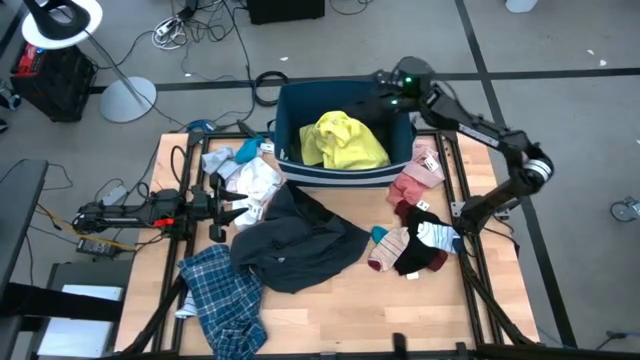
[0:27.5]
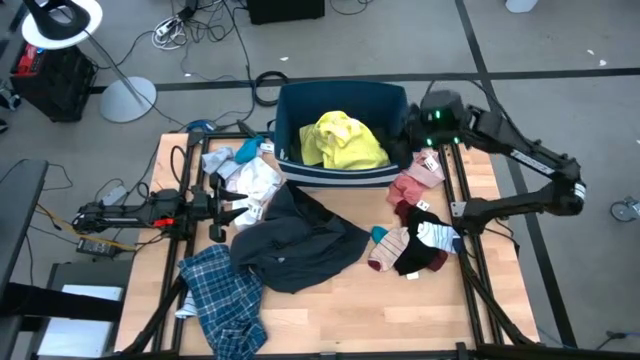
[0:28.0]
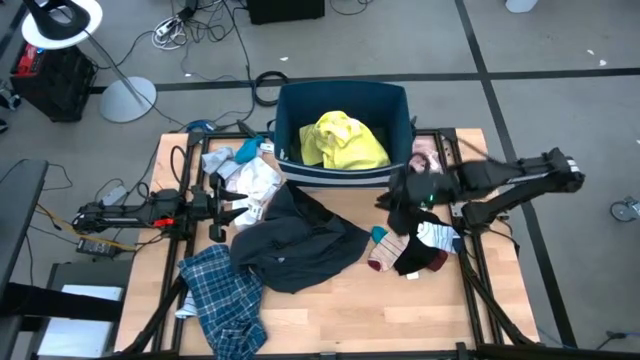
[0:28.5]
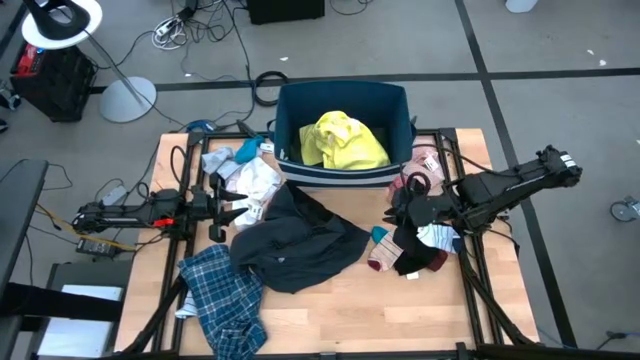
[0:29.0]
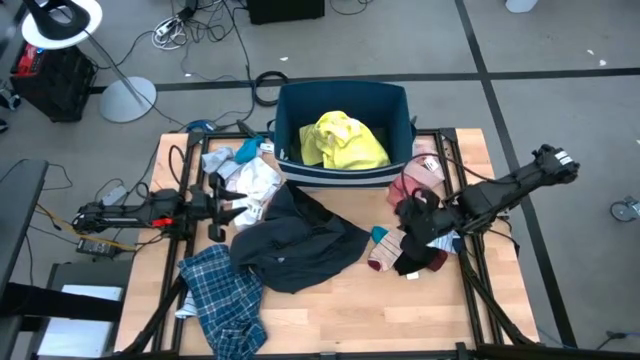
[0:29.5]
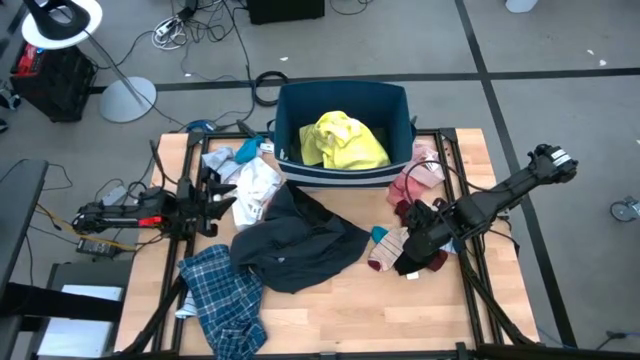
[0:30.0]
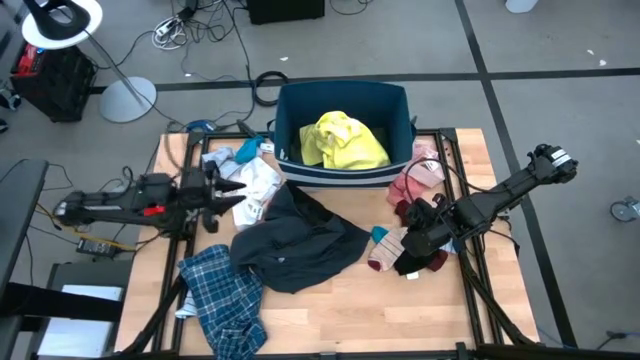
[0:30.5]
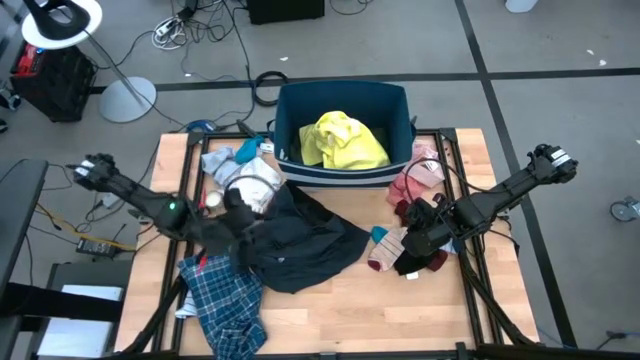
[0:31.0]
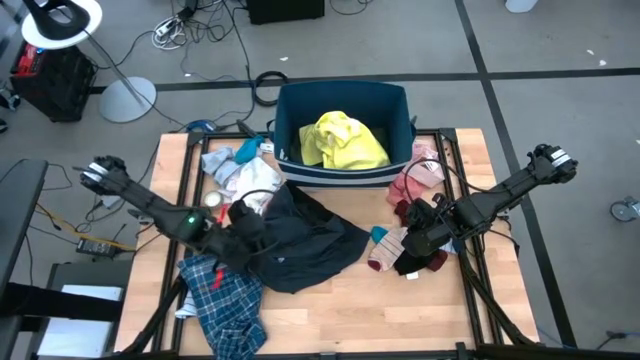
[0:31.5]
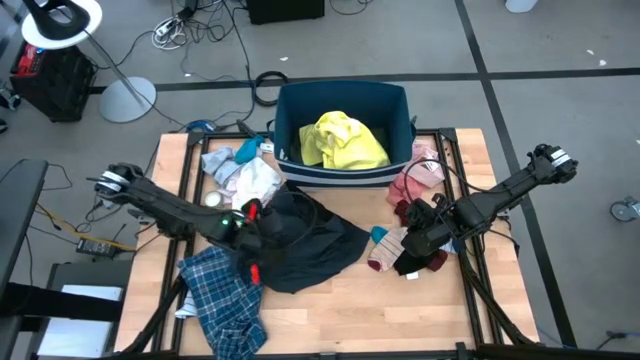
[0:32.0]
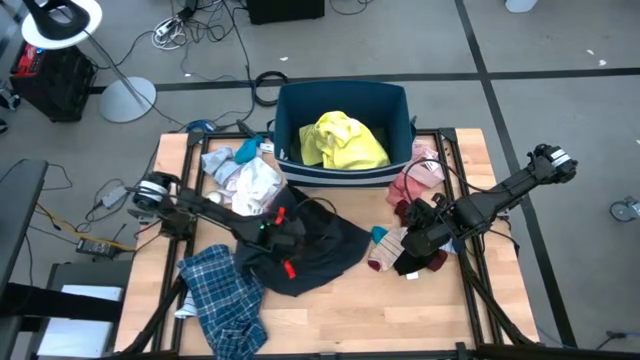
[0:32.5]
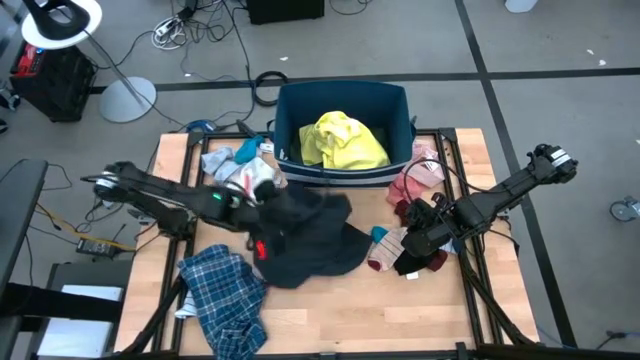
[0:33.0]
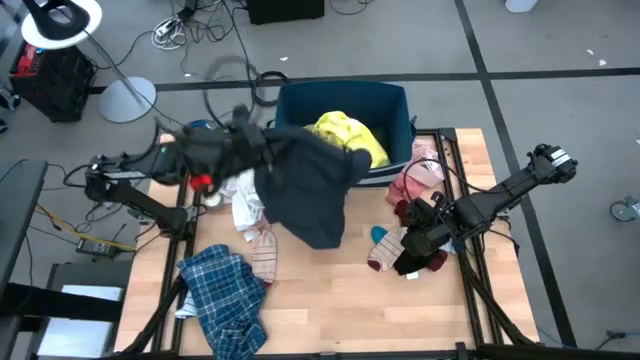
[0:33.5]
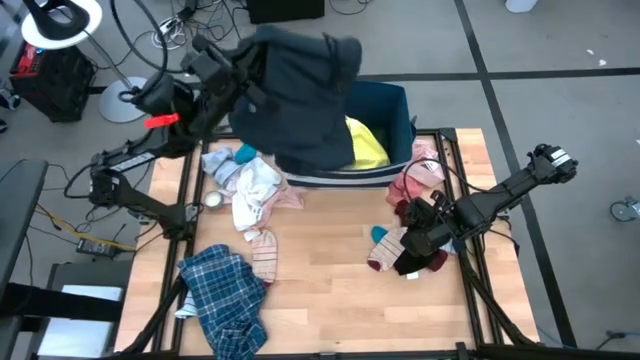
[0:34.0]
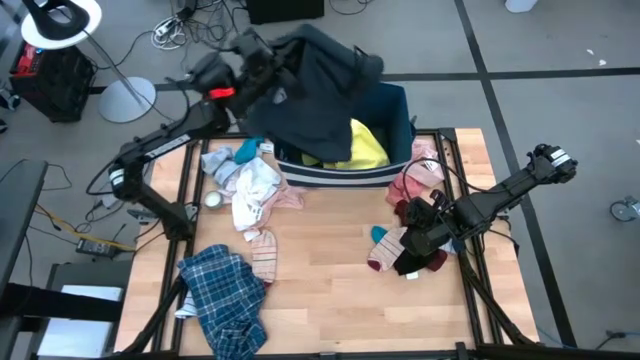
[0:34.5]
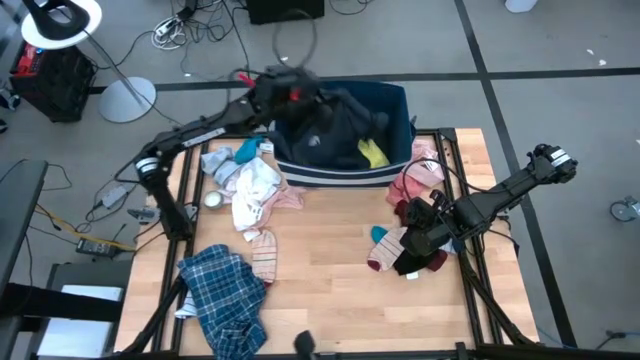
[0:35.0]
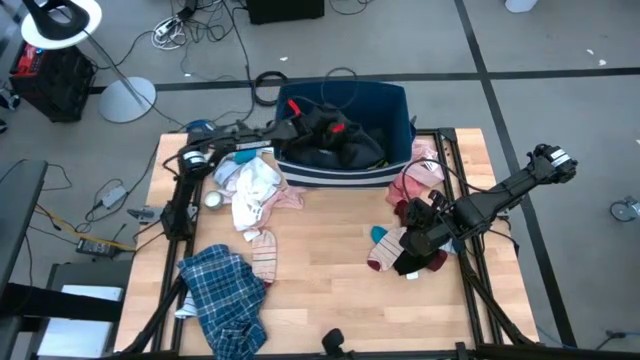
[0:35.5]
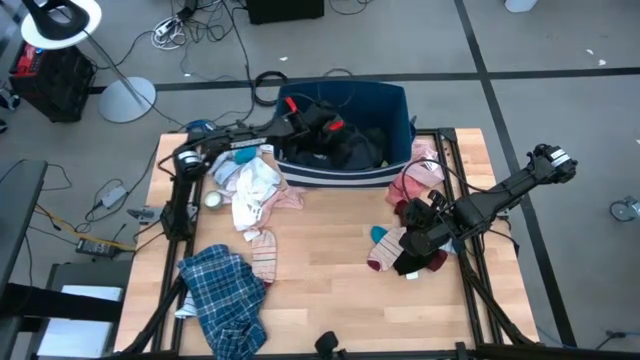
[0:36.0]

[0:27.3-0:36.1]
Task: Sort clothes
Put the black shorts into the blue bin

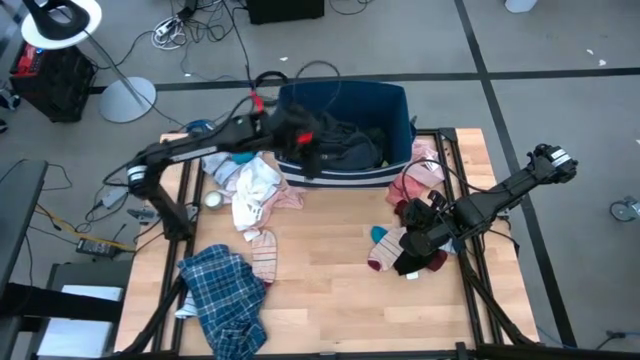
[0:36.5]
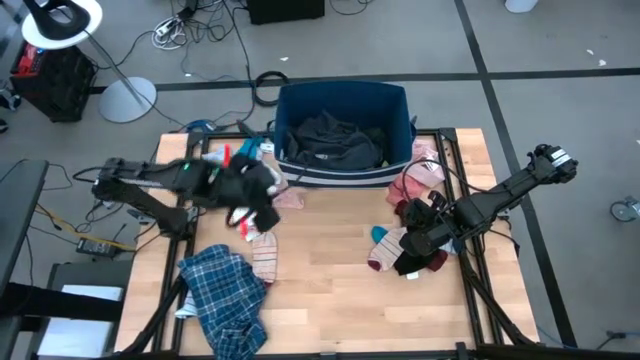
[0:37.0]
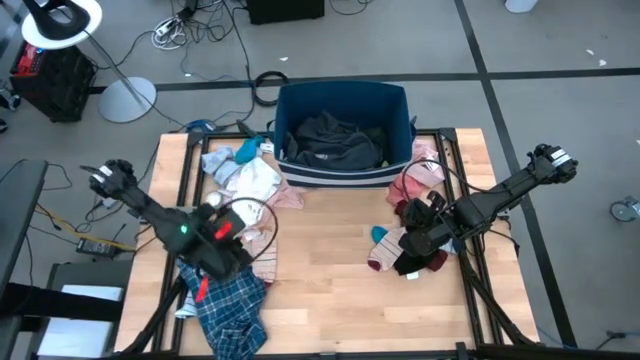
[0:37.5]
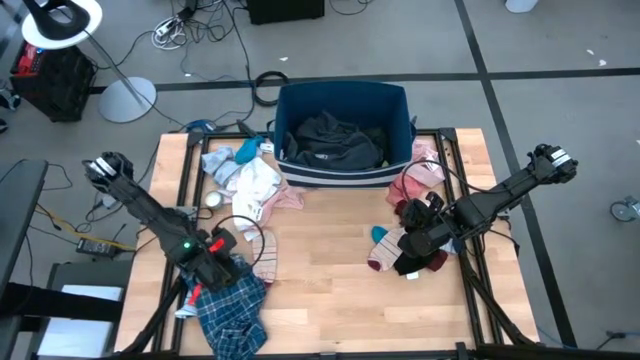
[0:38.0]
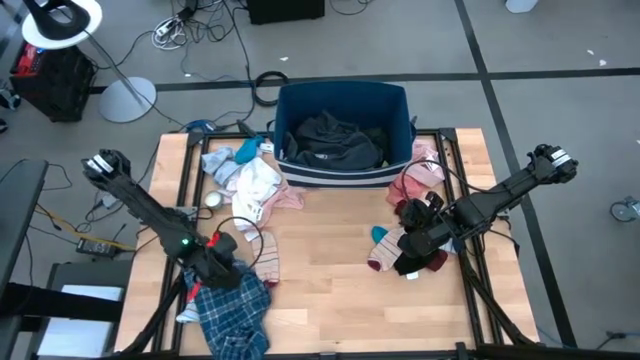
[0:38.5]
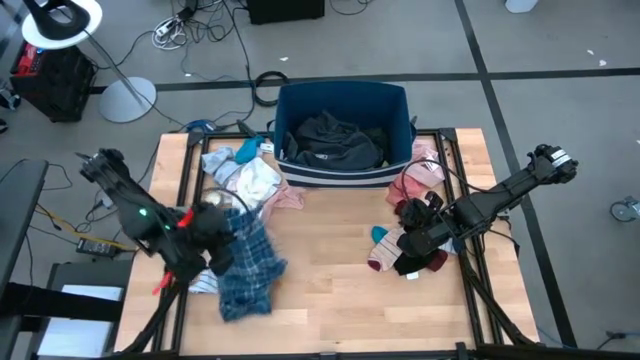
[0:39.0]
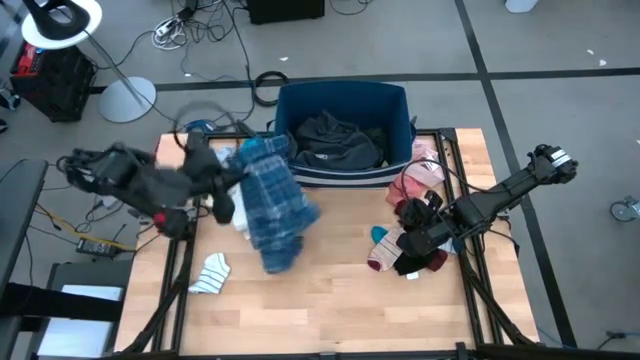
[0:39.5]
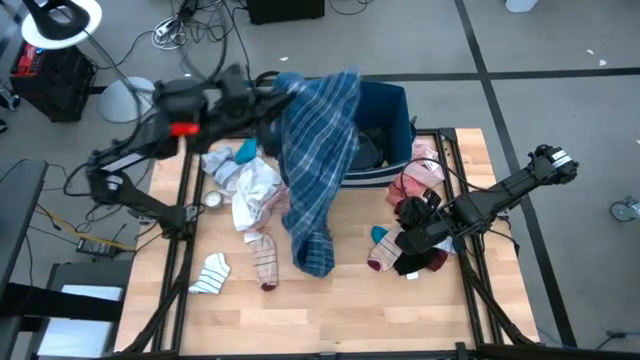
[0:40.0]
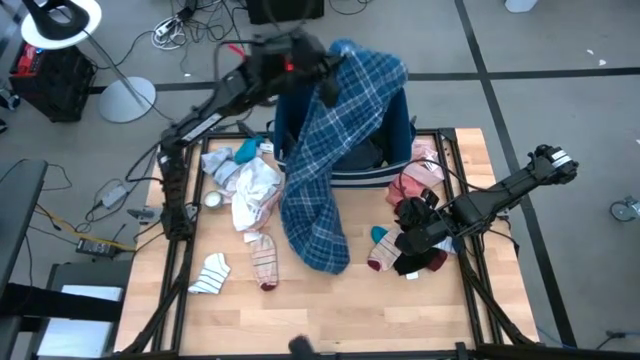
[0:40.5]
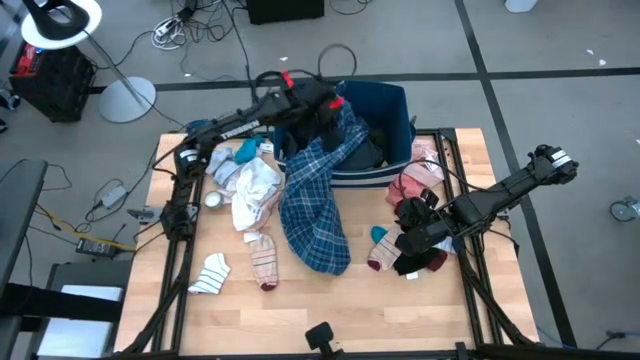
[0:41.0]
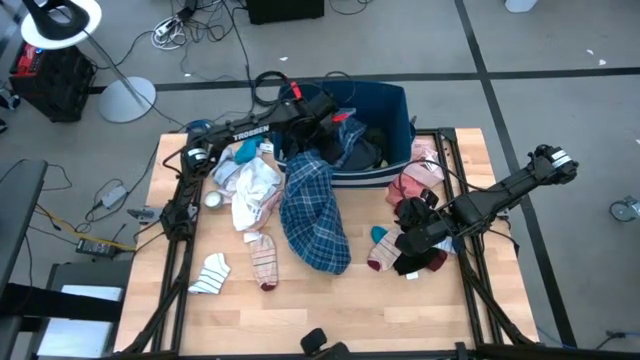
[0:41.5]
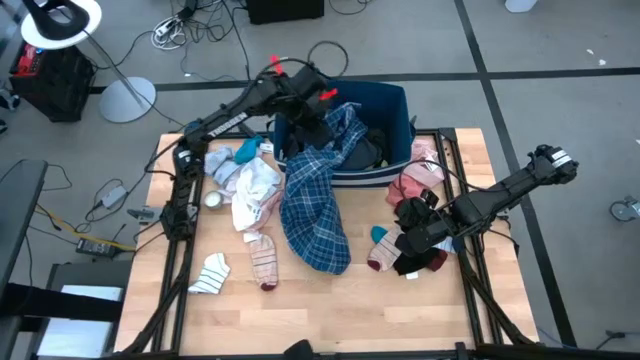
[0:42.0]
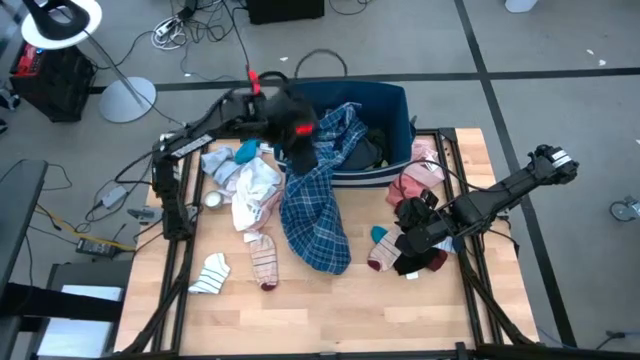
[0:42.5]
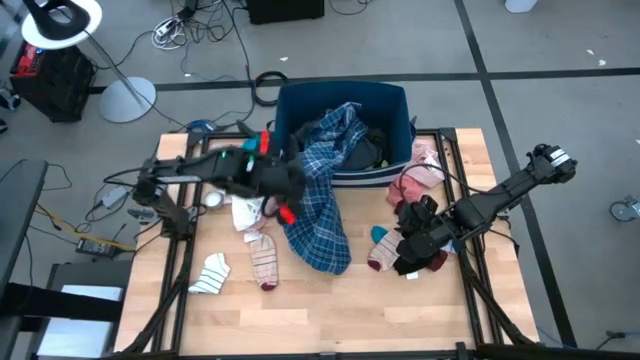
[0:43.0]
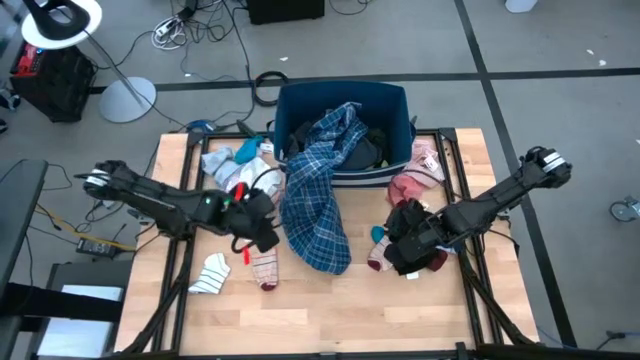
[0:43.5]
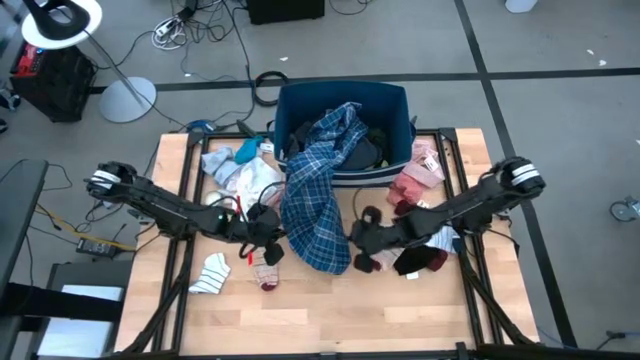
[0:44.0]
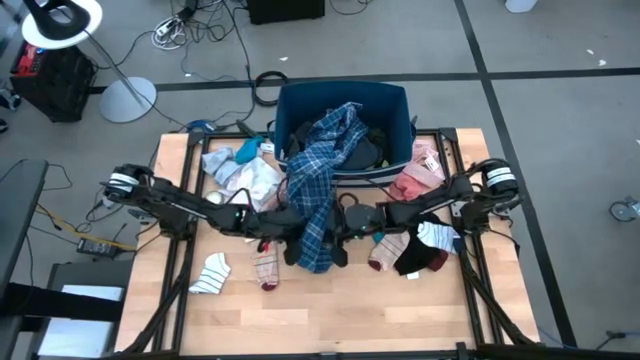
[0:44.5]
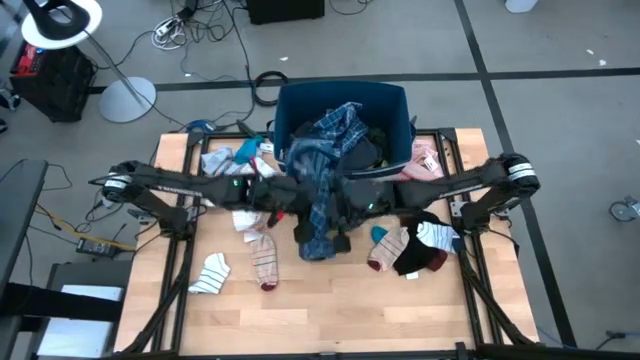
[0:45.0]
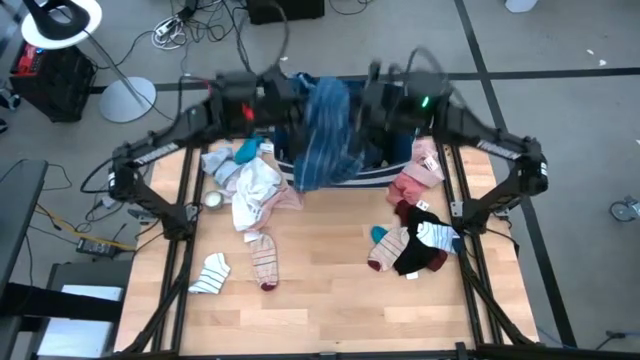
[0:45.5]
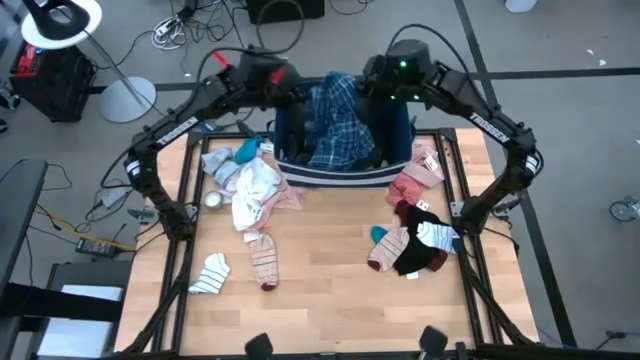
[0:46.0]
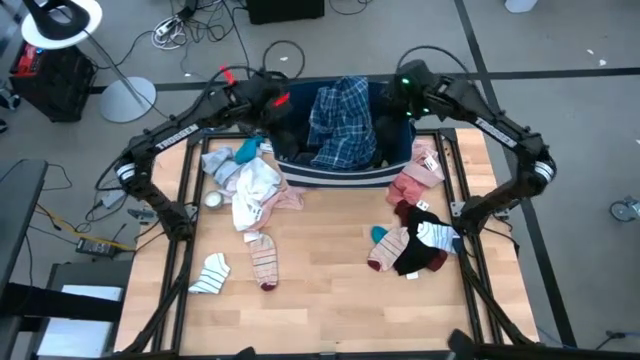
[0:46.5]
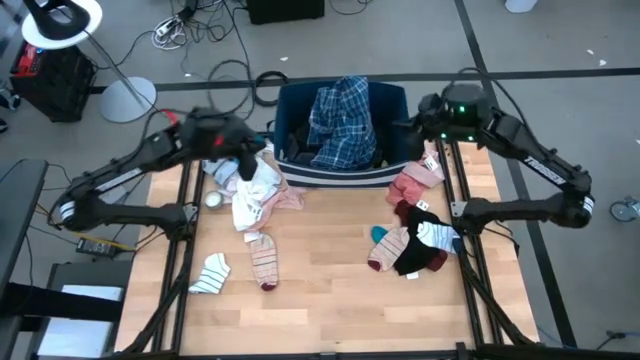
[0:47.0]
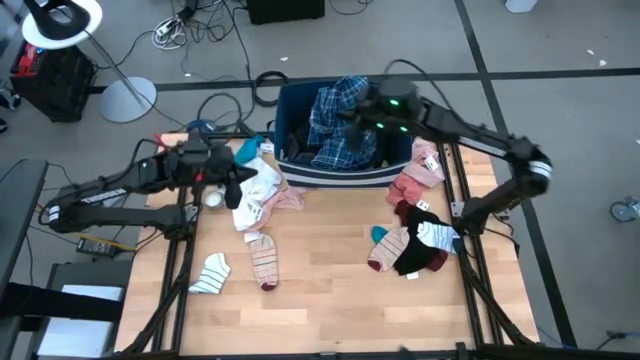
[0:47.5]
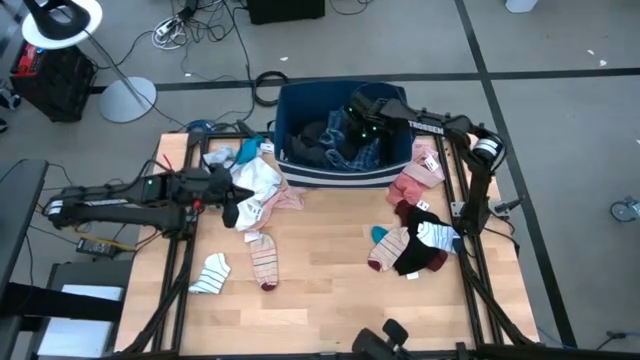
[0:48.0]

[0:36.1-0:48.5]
Put the blue patterned pants into the blue bin

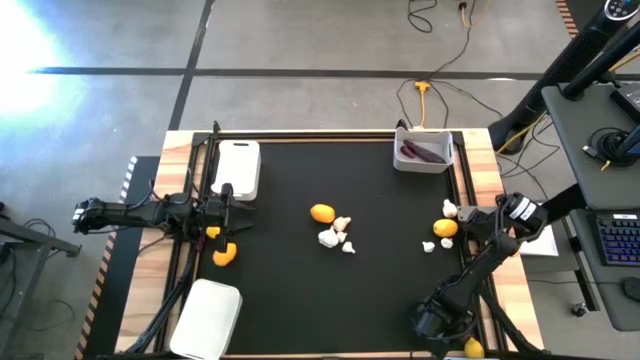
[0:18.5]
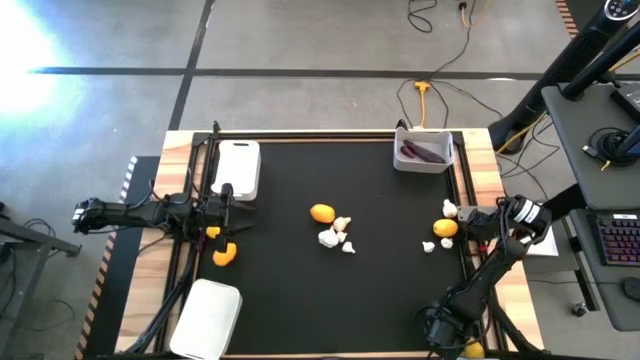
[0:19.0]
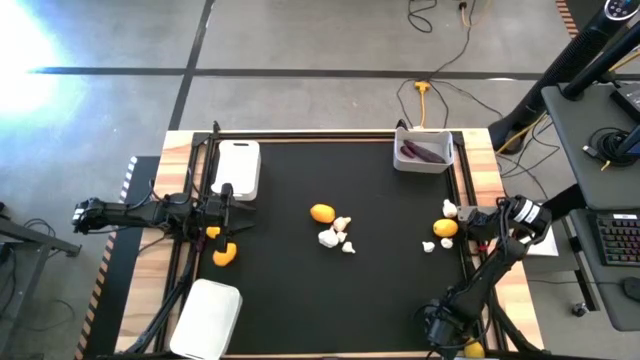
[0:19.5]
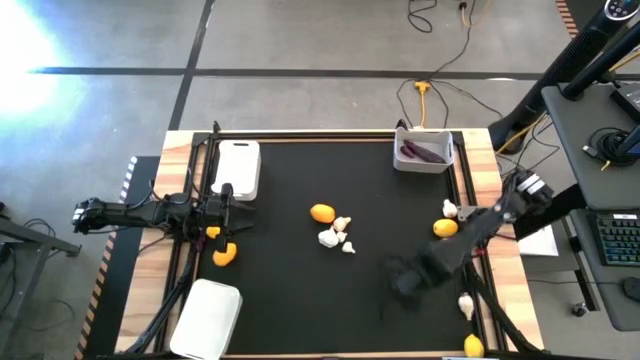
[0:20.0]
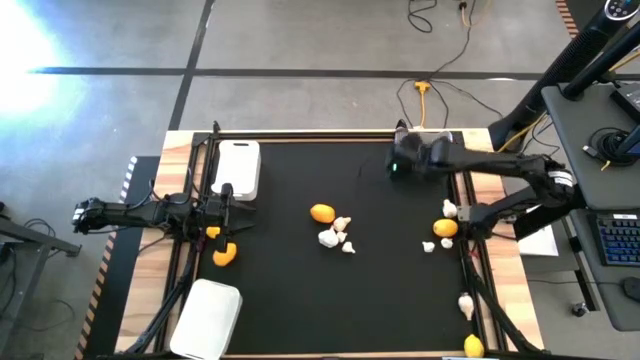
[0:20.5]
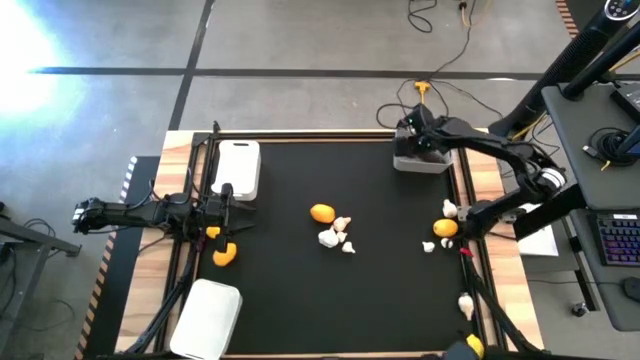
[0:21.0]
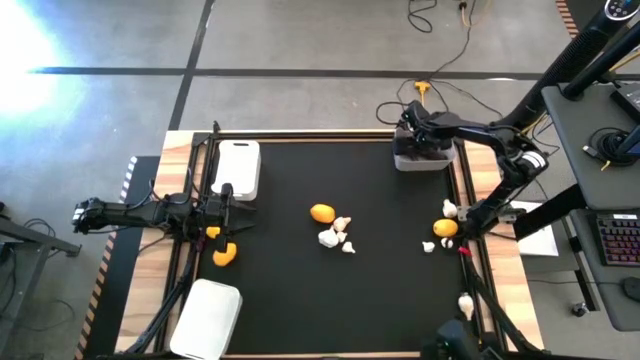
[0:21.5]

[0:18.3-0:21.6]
Task: Sort produce into baskets
Put the small eggplant into the gray bin
